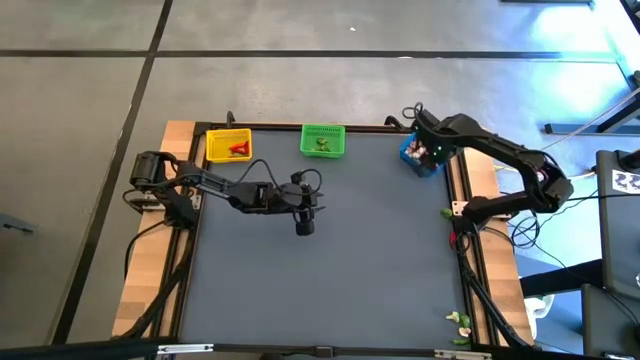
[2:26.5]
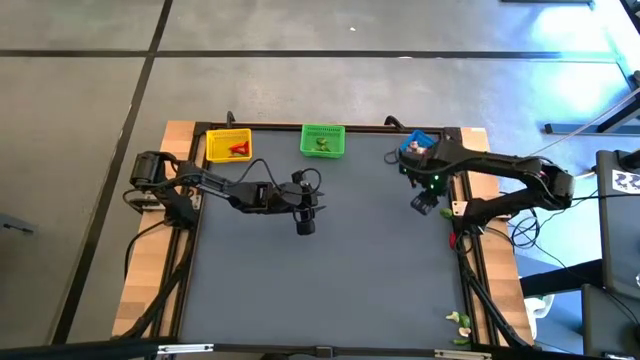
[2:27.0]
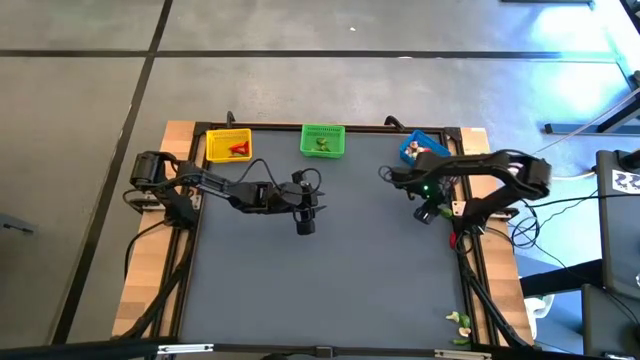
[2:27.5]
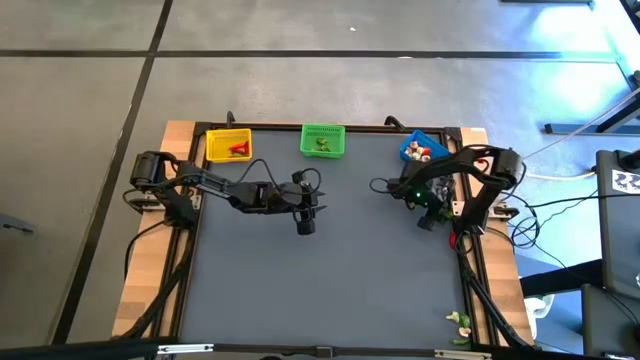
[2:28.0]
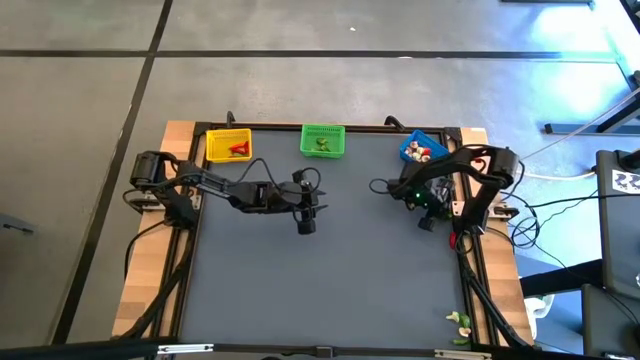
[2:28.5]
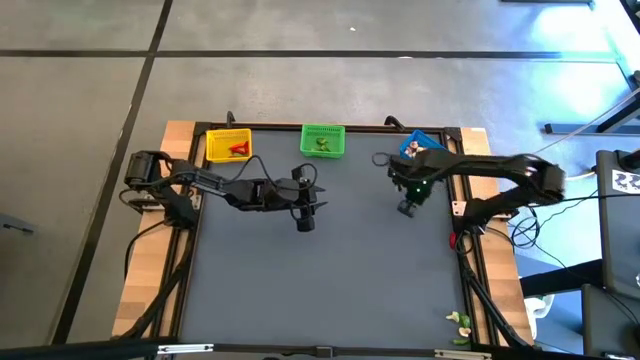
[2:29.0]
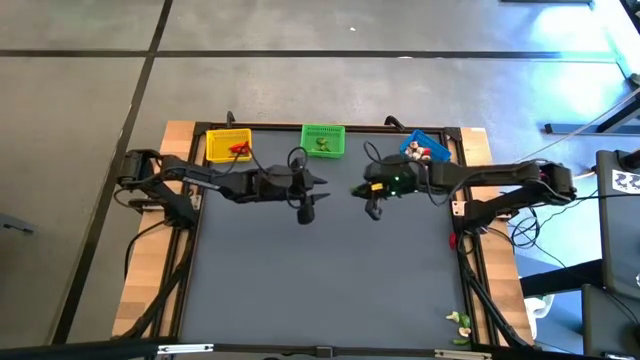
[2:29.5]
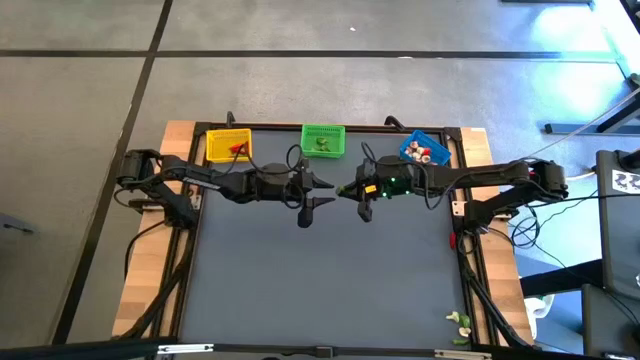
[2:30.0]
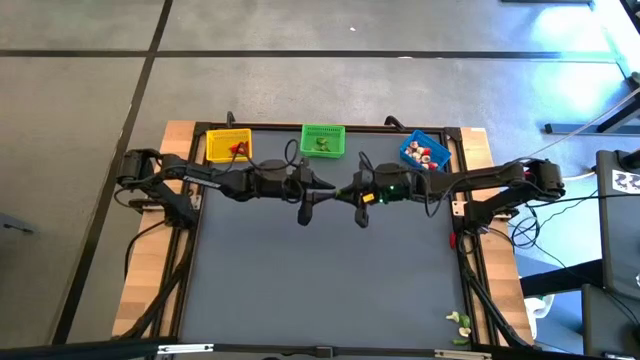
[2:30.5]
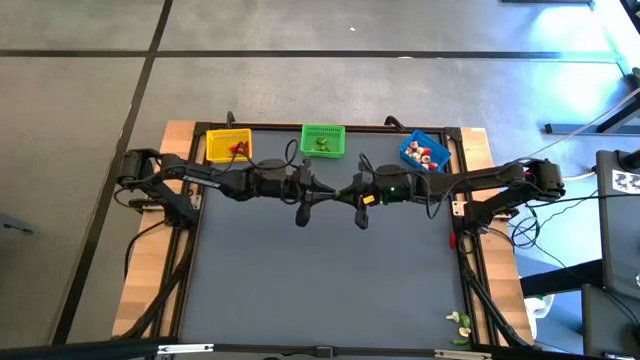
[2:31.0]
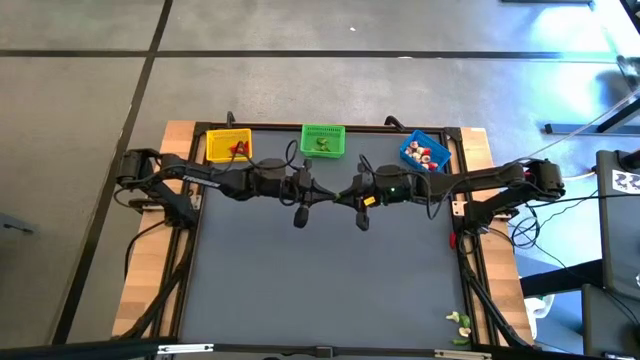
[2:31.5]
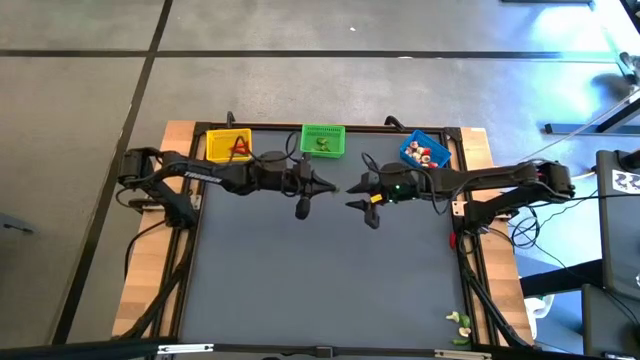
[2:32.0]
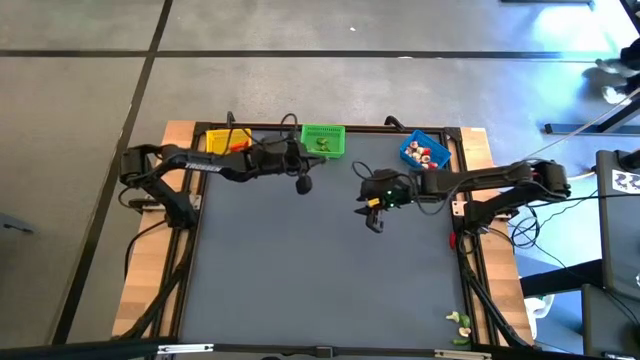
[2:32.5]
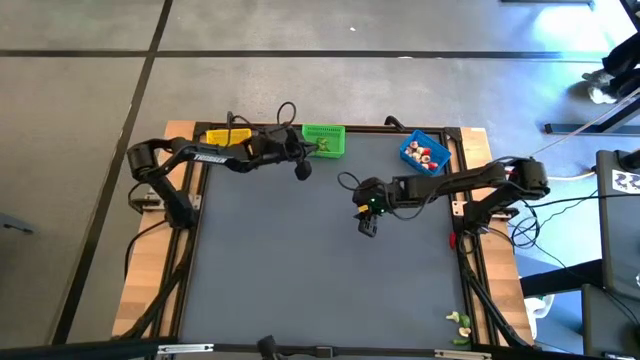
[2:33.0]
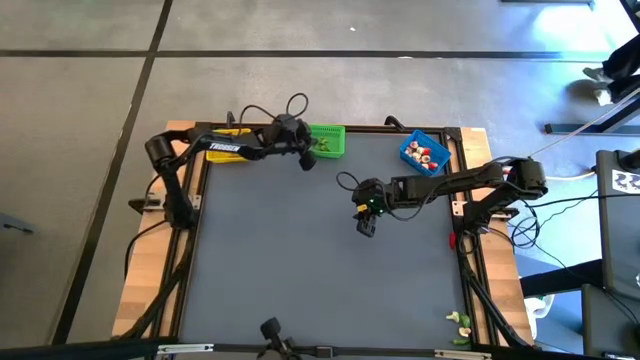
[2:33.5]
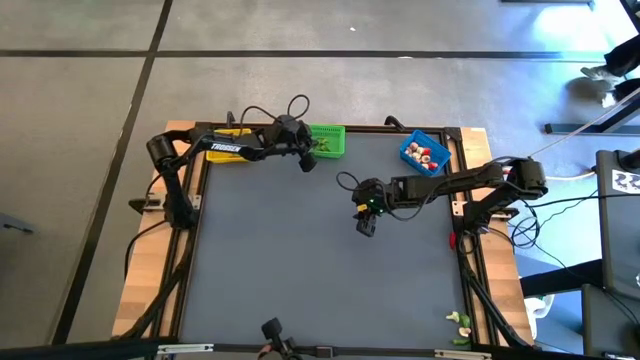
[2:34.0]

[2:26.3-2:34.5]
Task: Sort produce into baskets
Put the small green chili pepper into the green basket

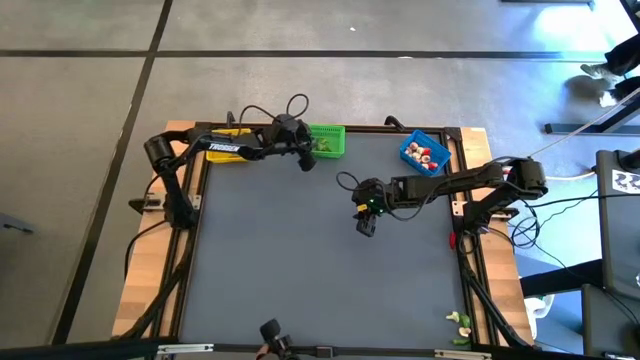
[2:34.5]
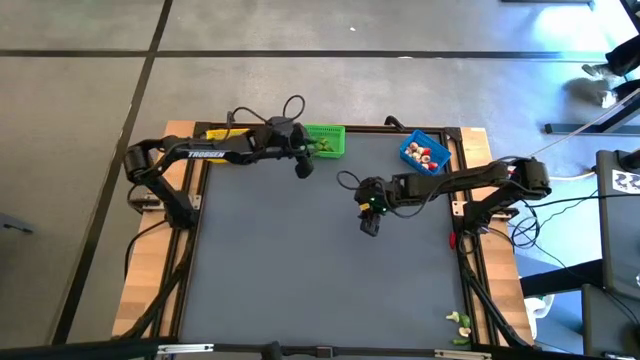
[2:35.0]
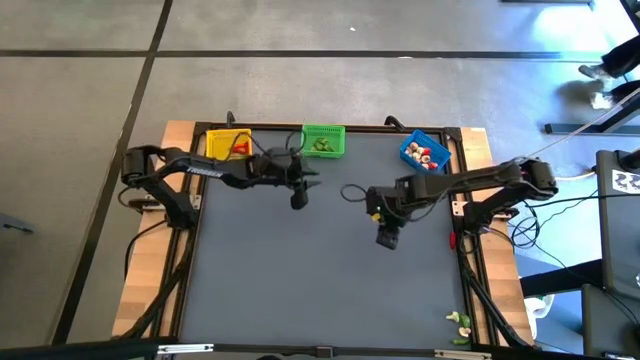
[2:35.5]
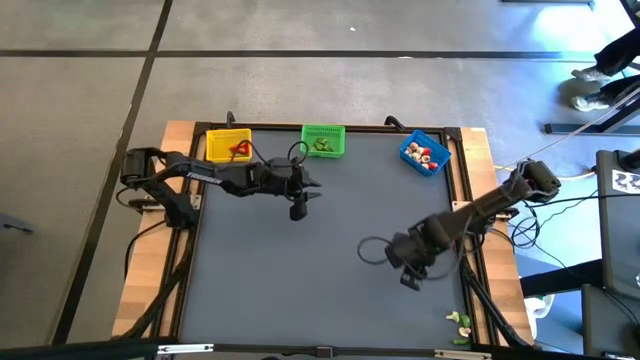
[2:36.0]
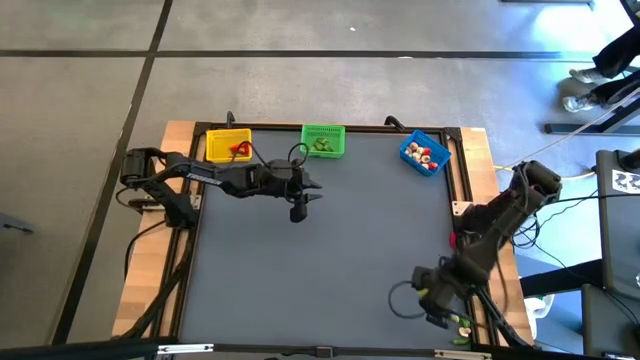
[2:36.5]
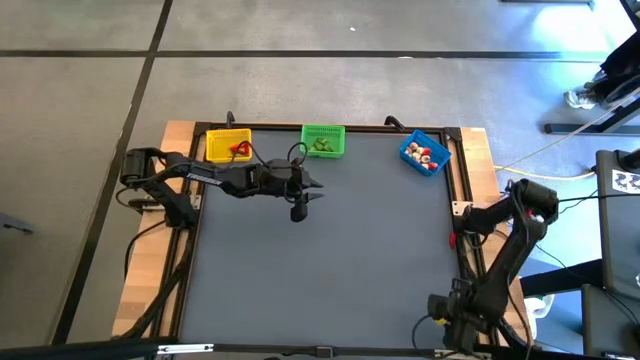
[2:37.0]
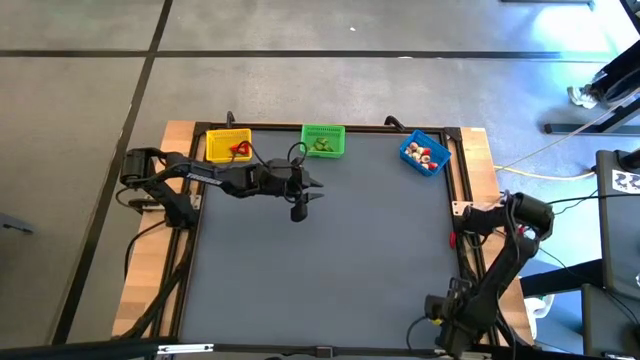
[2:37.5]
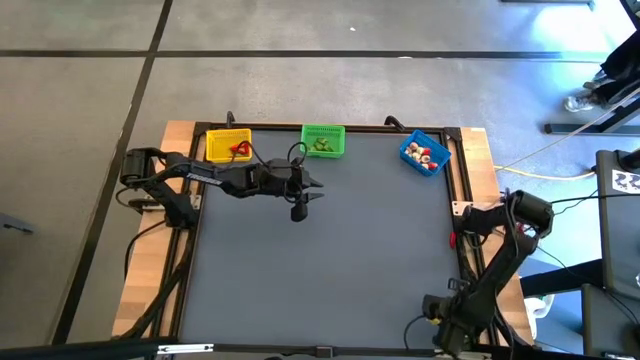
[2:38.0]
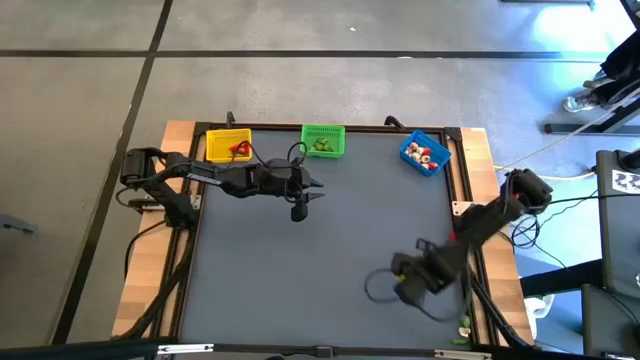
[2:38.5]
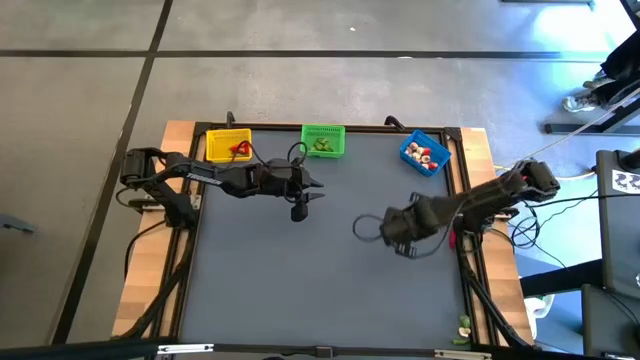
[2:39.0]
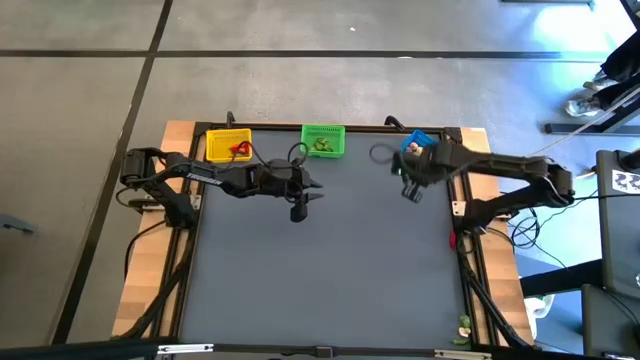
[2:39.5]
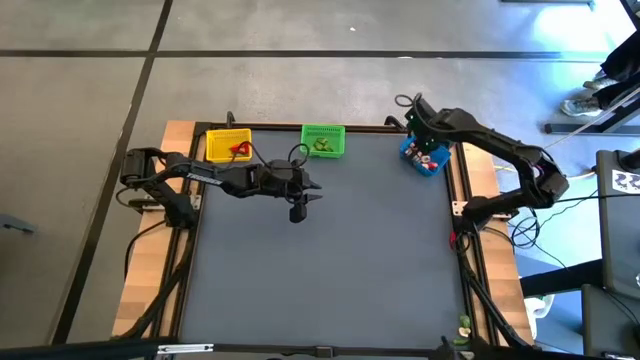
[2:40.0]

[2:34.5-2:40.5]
Put the green mushroom into the blue basket

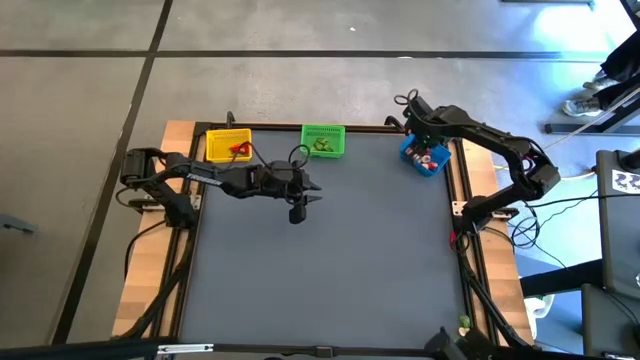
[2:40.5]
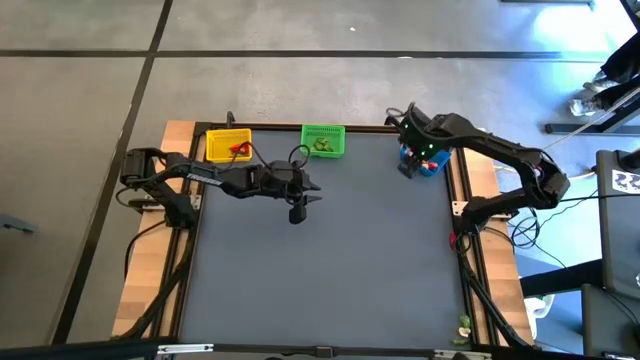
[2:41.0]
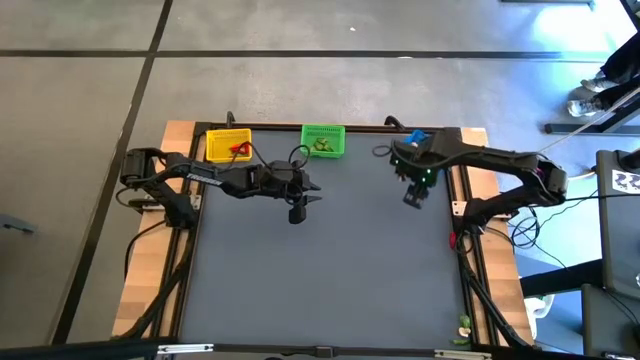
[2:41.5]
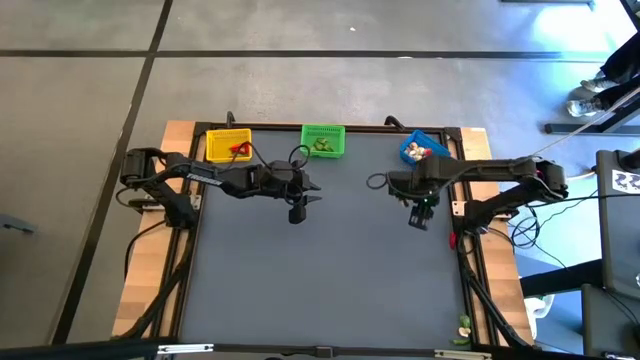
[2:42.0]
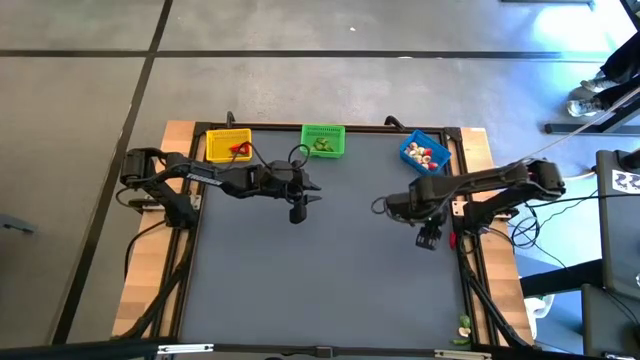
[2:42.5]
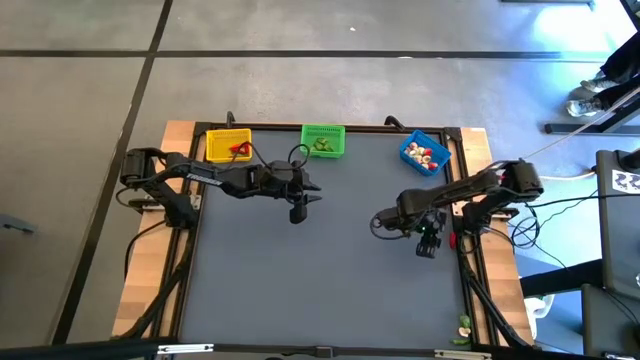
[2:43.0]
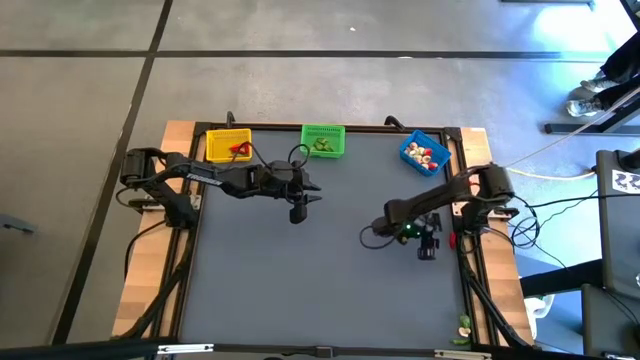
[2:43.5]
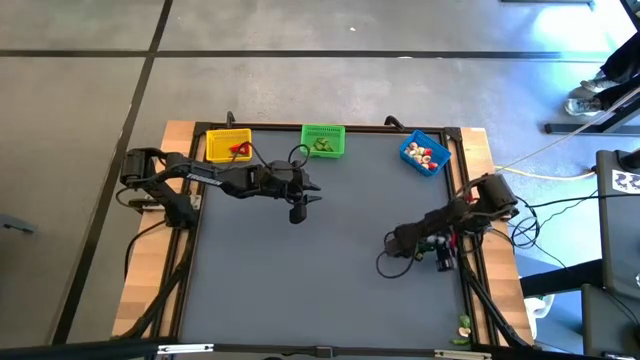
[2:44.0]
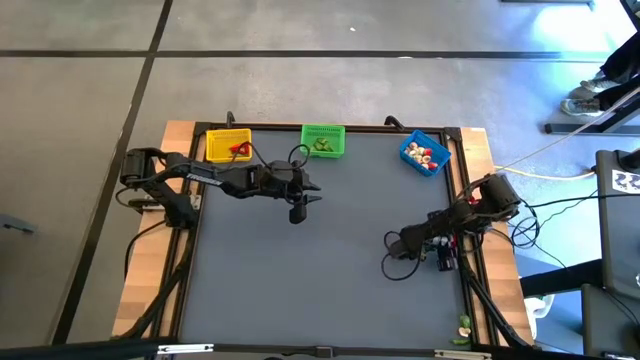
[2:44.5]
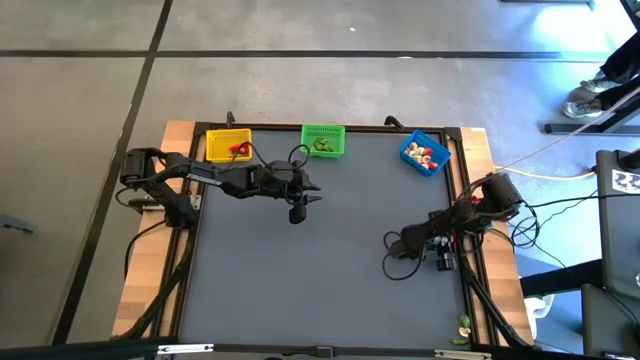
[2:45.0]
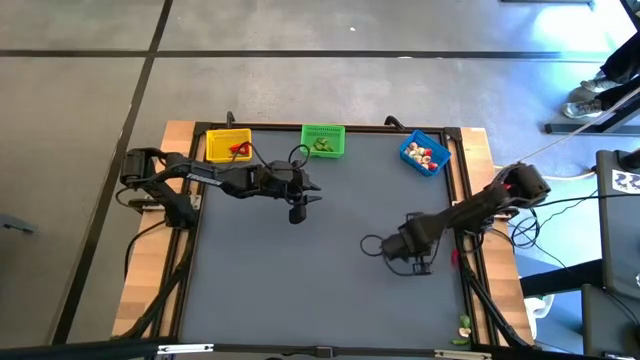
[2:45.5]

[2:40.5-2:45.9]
Put the red chili pepper into the yellow basket

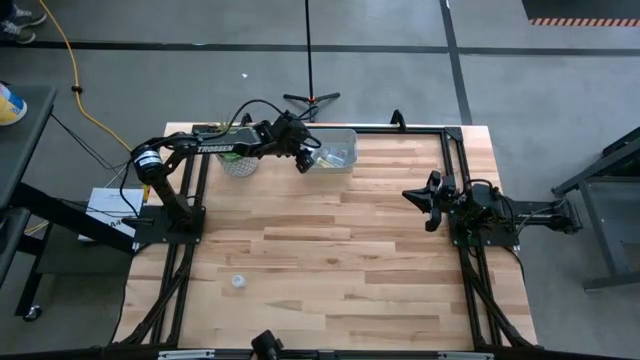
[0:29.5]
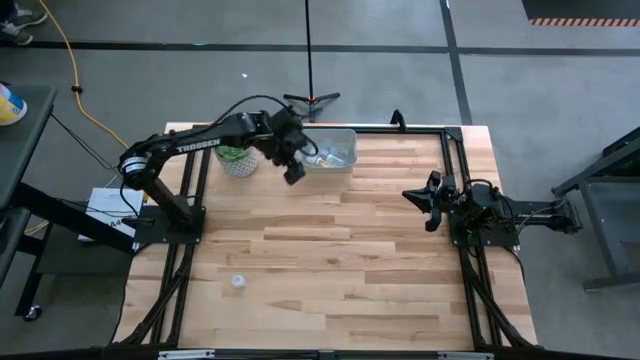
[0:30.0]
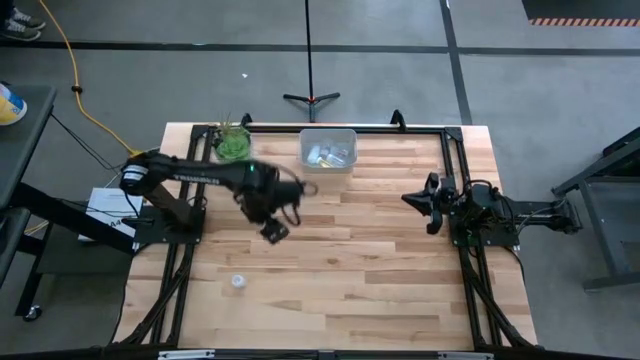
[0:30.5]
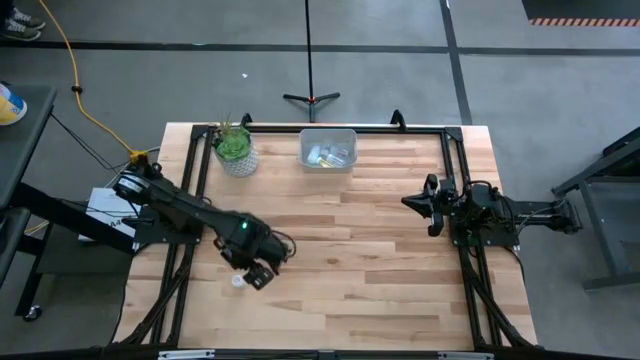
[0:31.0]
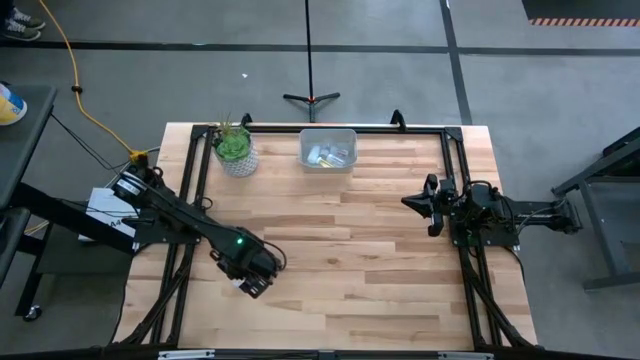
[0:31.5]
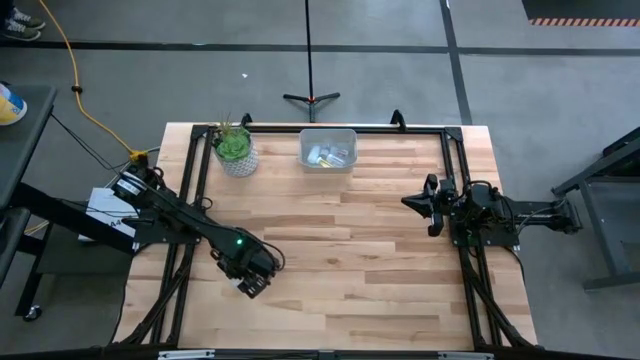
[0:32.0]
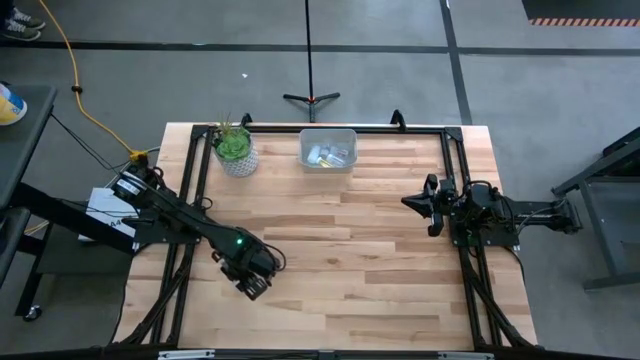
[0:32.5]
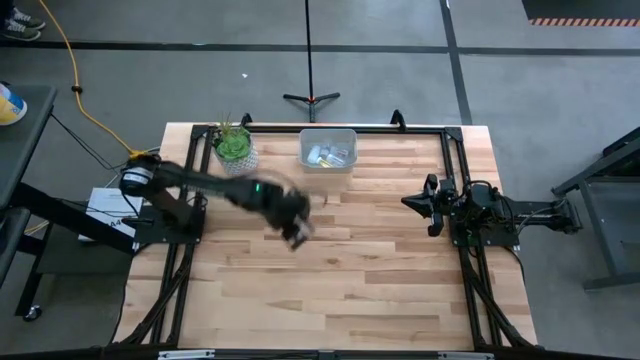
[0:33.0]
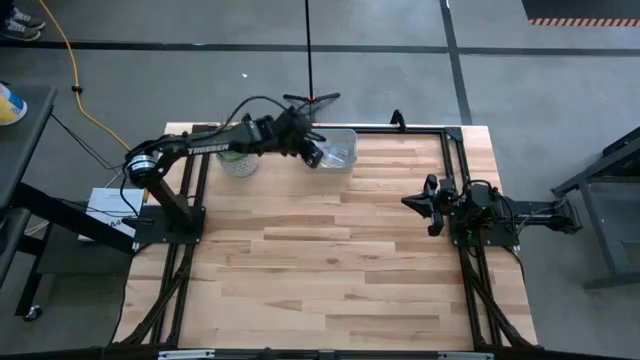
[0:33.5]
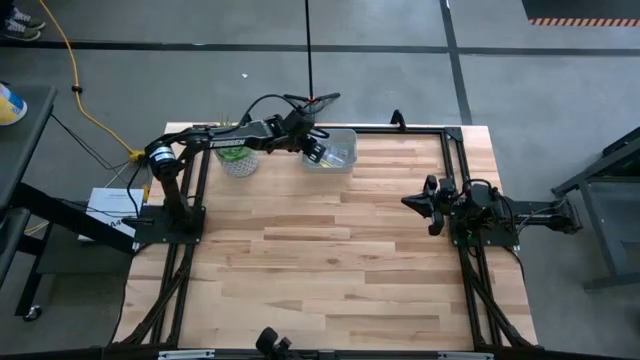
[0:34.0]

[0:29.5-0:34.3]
Task: Pick and place pill bottles into a basket
Put the transparent pill bottle into the gray bin
